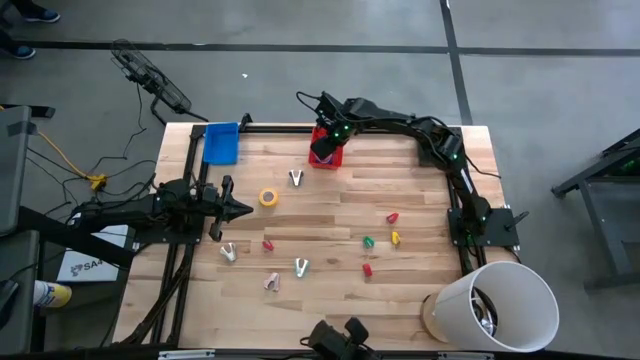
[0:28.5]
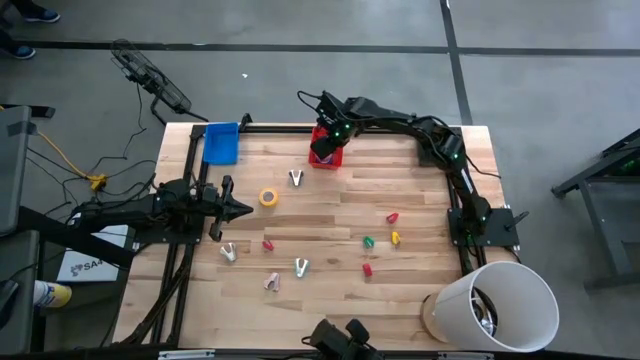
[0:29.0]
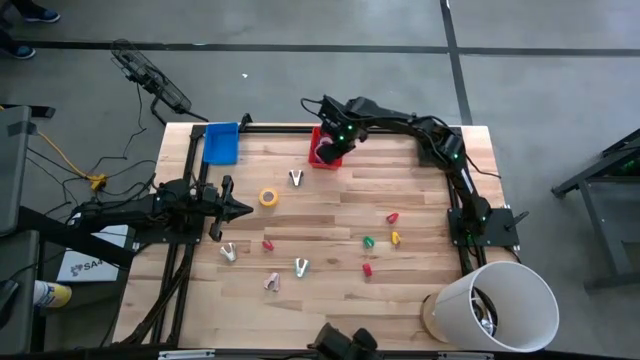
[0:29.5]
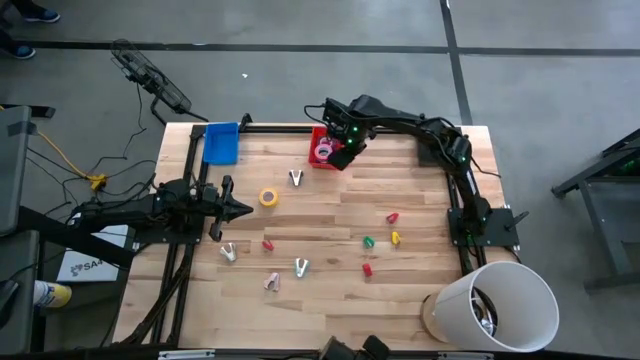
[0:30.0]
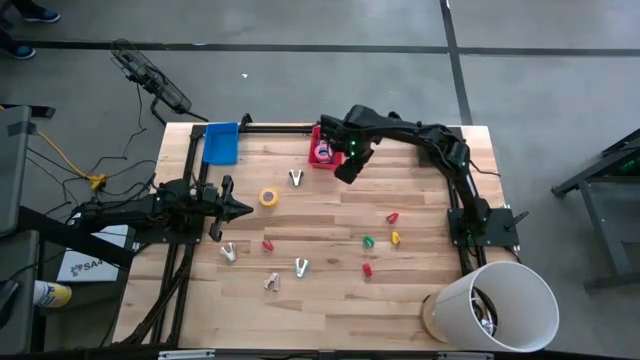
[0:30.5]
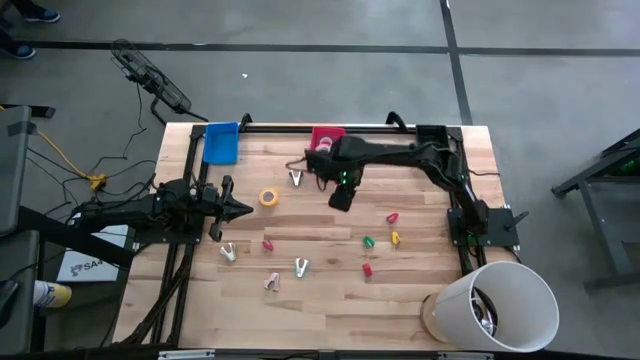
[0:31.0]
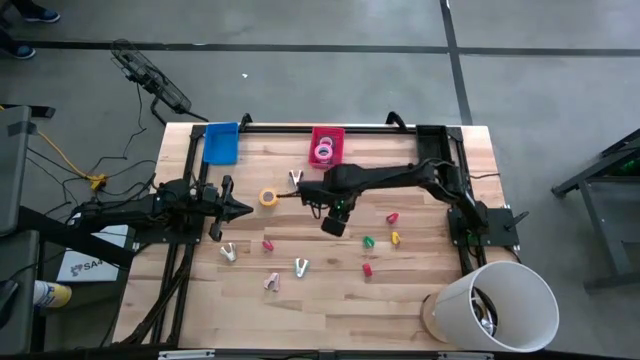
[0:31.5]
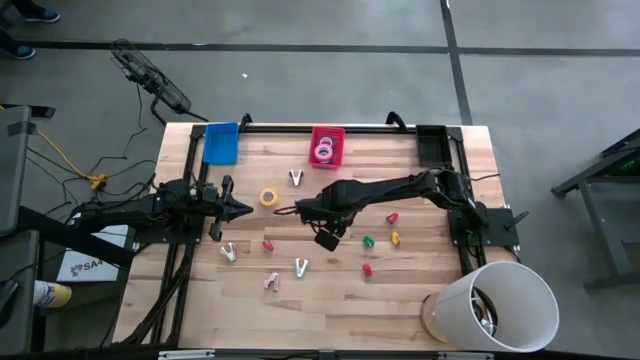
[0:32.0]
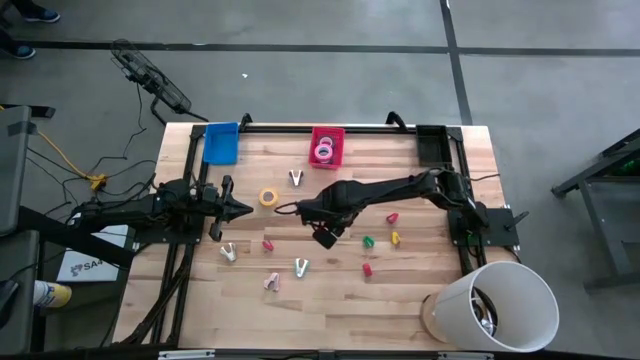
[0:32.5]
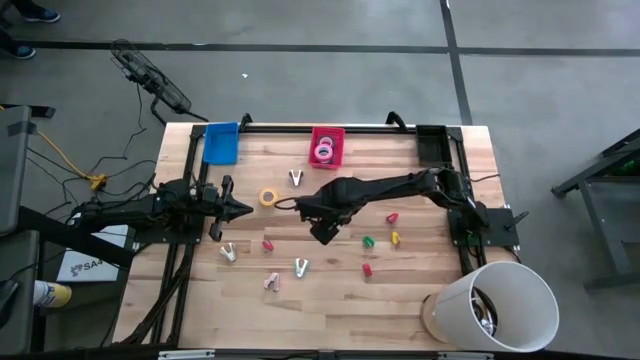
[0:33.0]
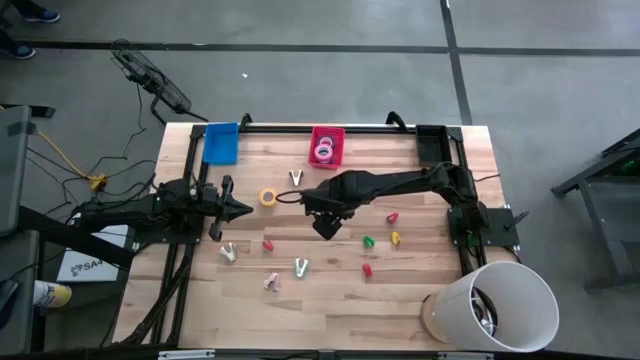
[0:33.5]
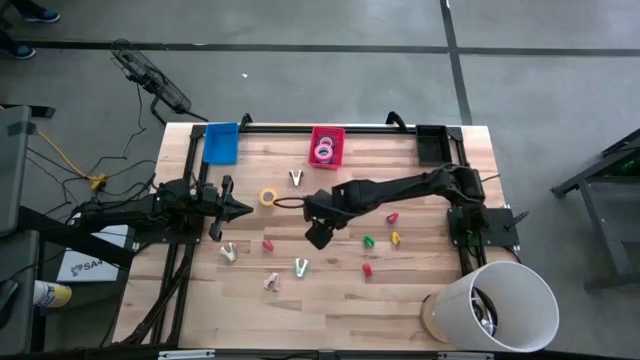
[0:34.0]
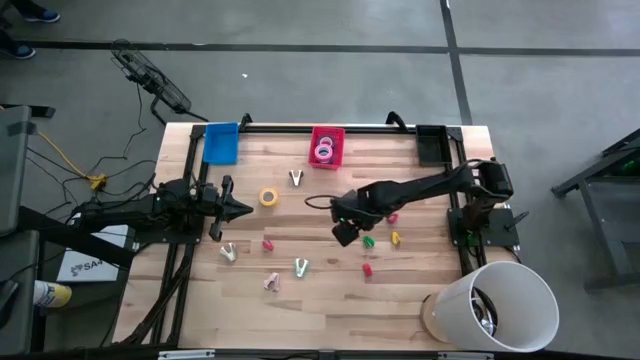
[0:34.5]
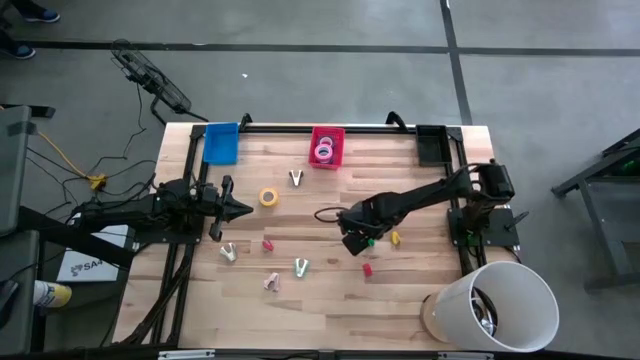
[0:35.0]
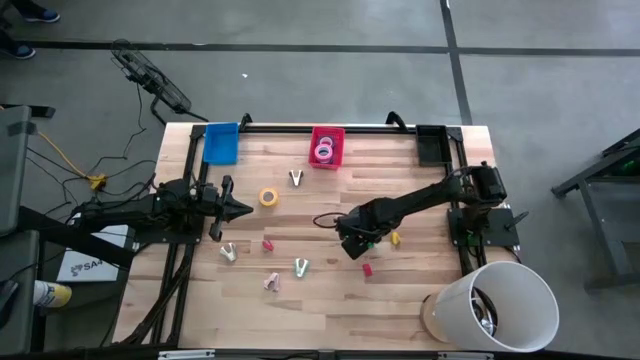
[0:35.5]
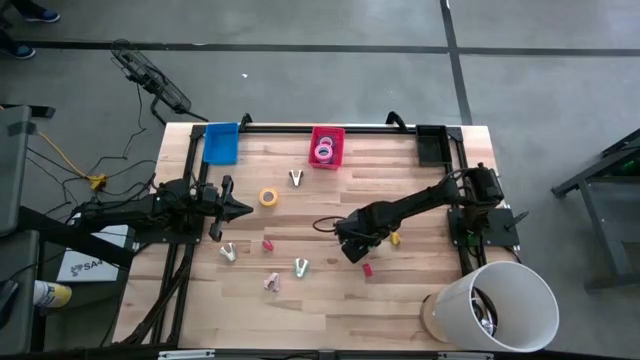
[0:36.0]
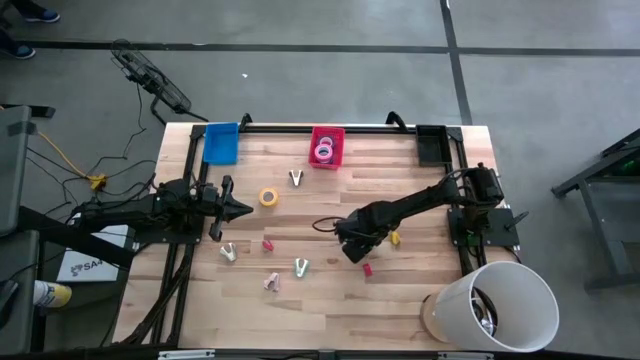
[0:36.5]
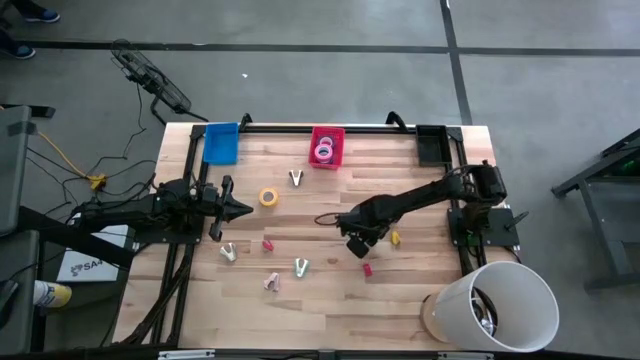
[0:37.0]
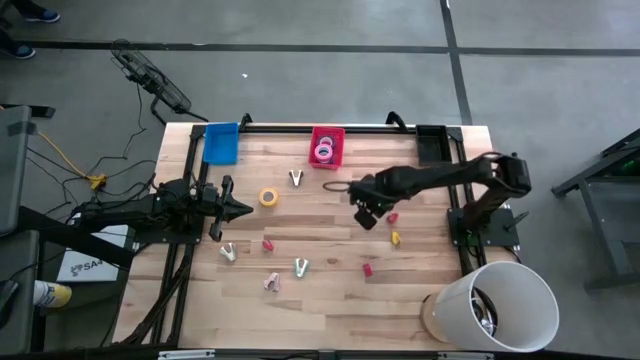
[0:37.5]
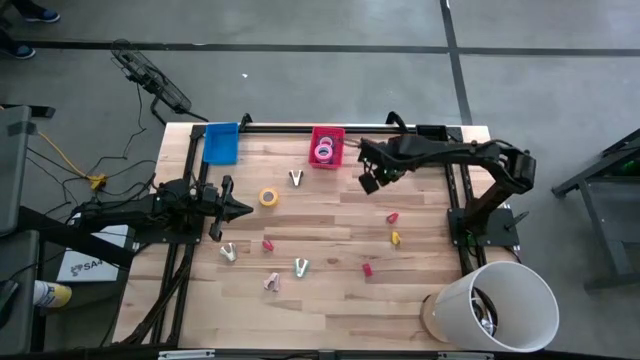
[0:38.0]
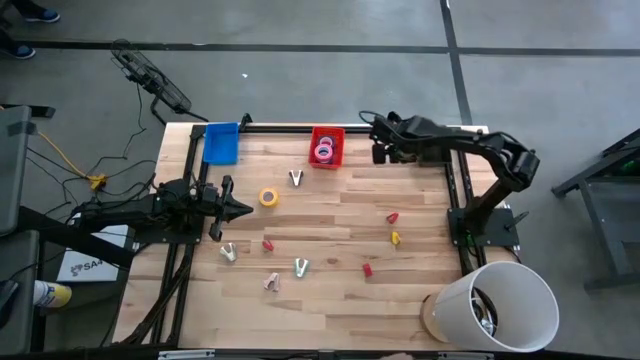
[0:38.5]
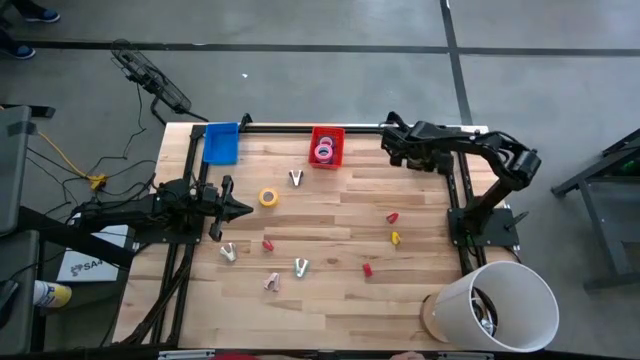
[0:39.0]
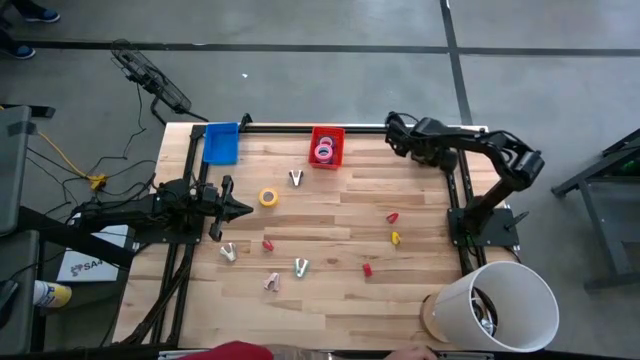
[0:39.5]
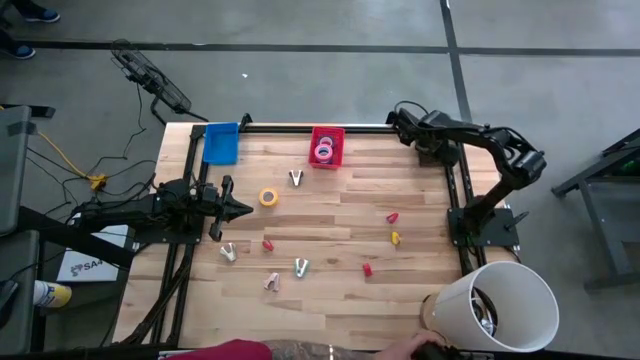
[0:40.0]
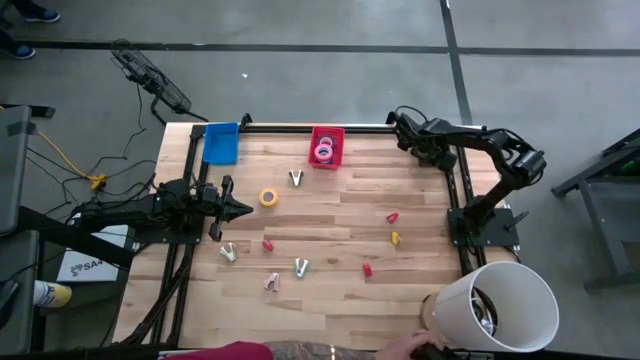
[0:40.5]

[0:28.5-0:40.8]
Task: Pick and place Stapler, Stapler remover, tape
Put the green stapler into the black bin

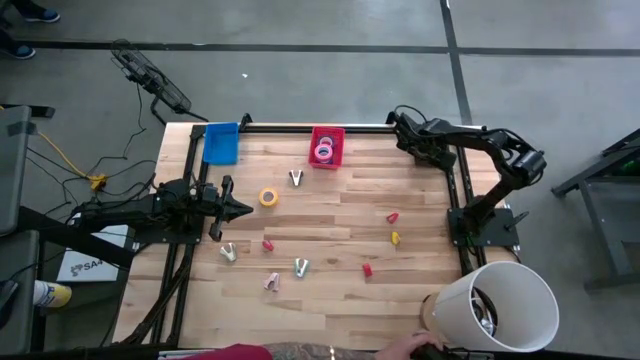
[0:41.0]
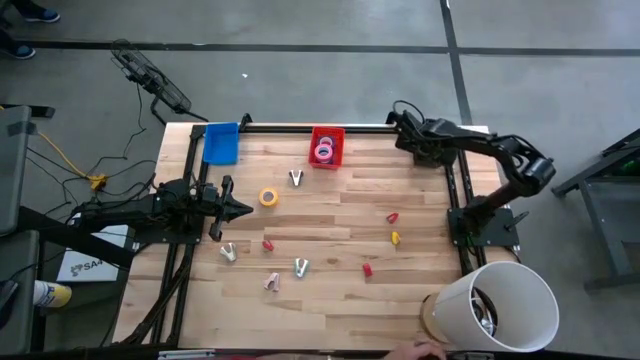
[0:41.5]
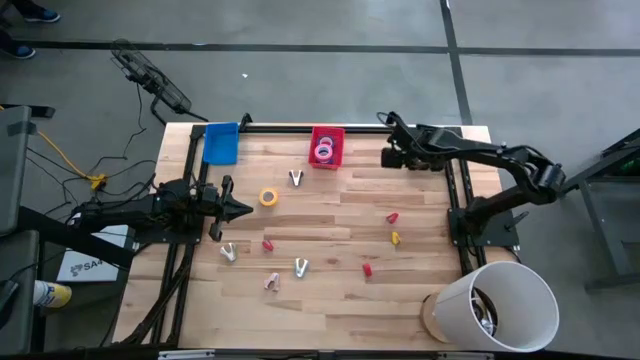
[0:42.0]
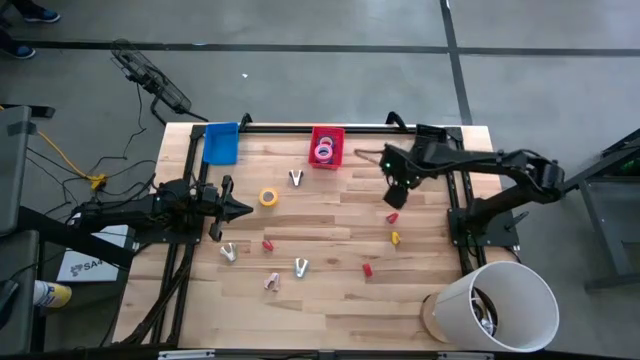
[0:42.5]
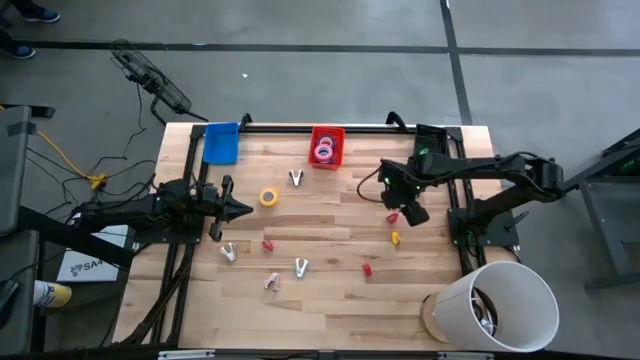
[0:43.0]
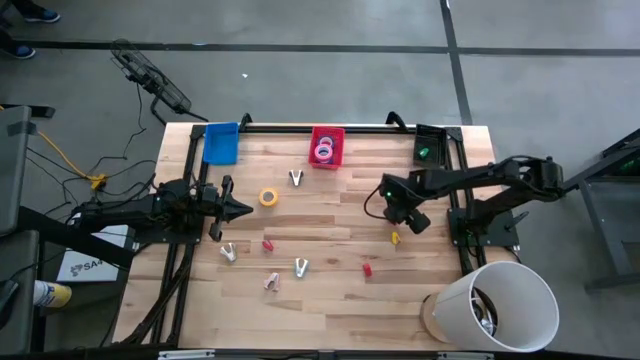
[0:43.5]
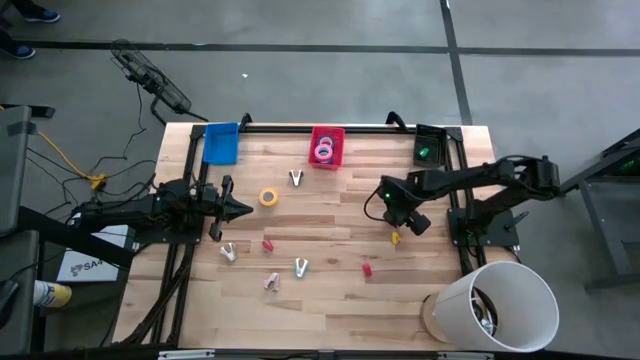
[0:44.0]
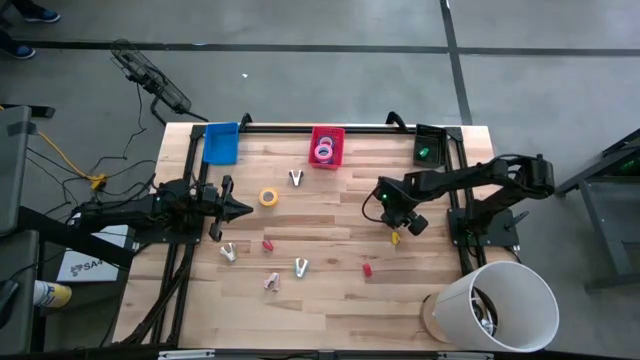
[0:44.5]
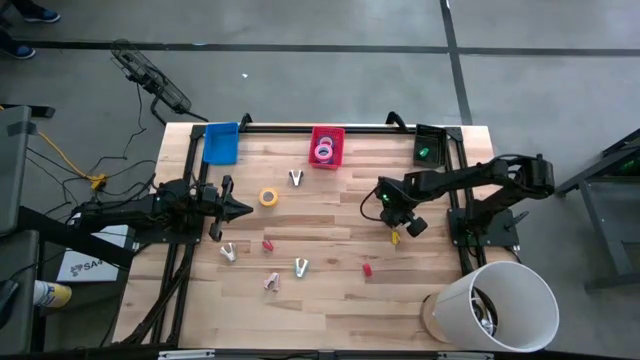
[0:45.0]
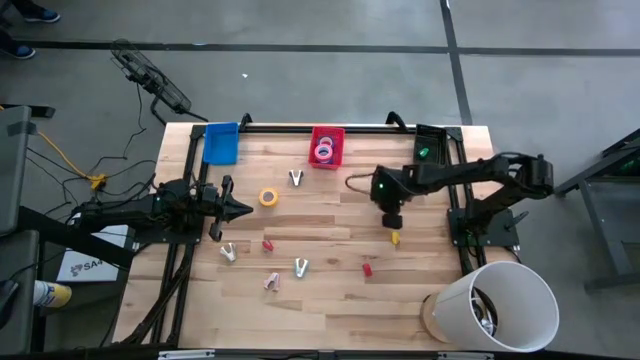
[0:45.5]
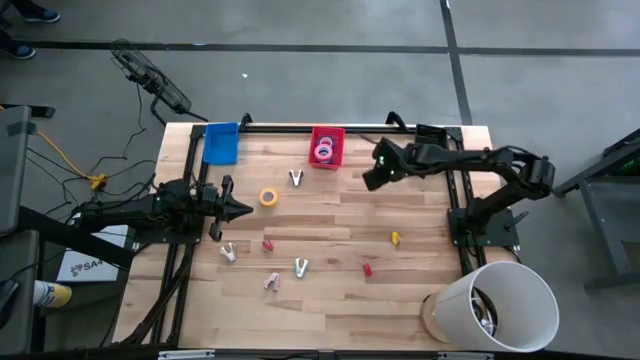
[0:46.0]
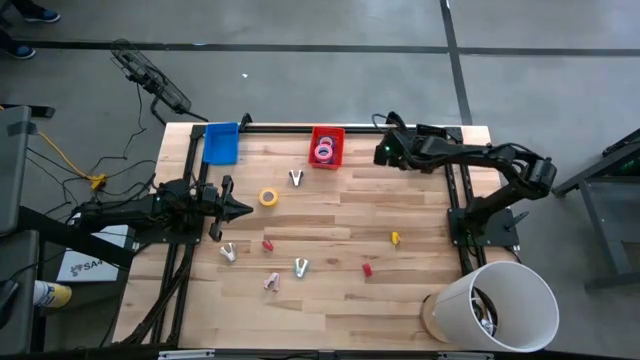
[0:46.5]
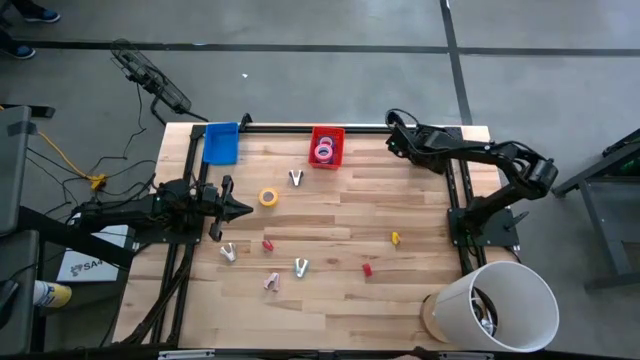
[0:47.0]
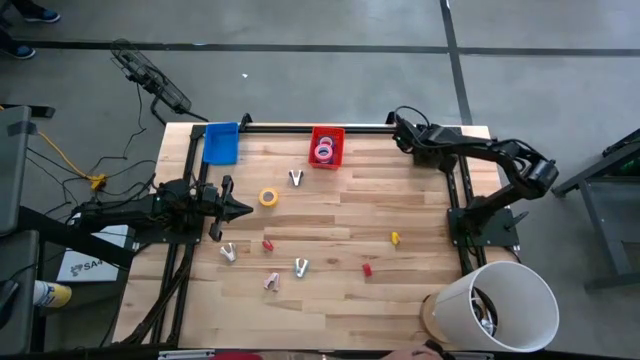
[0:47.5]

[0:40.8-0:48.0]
Put the top red stapler into the black bin

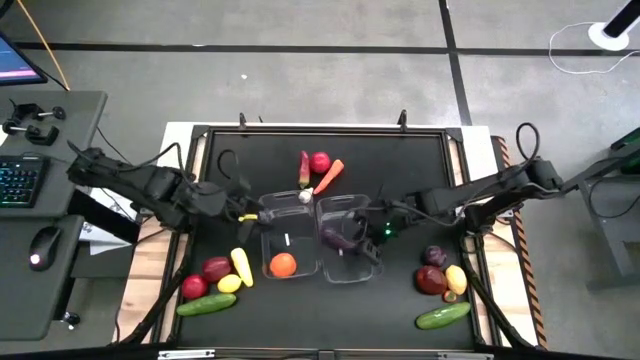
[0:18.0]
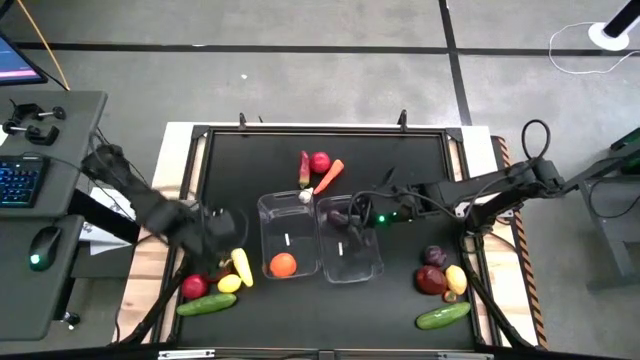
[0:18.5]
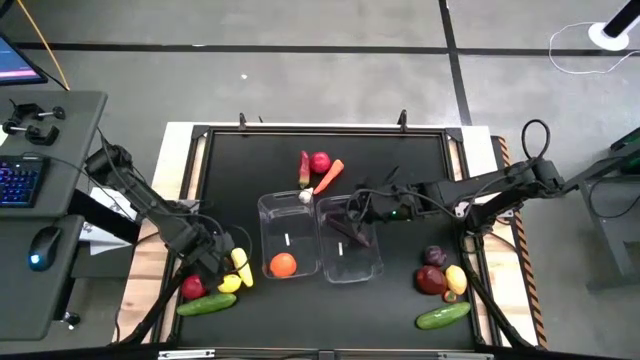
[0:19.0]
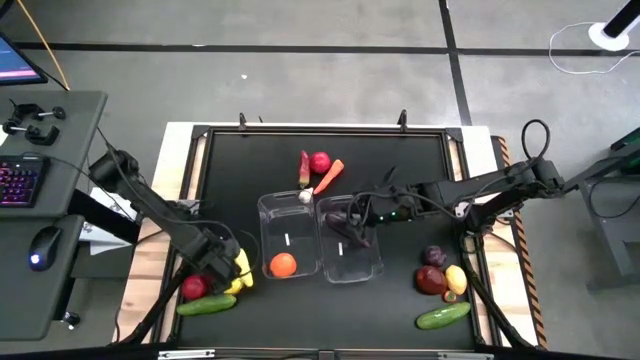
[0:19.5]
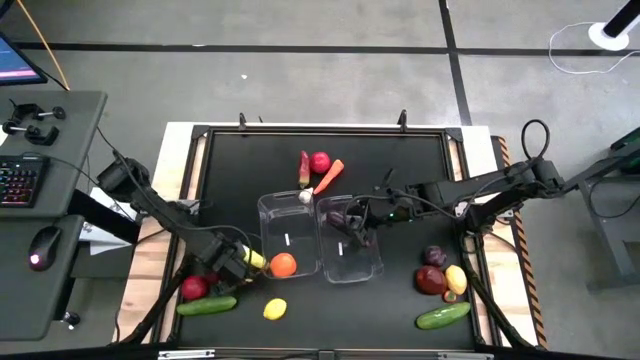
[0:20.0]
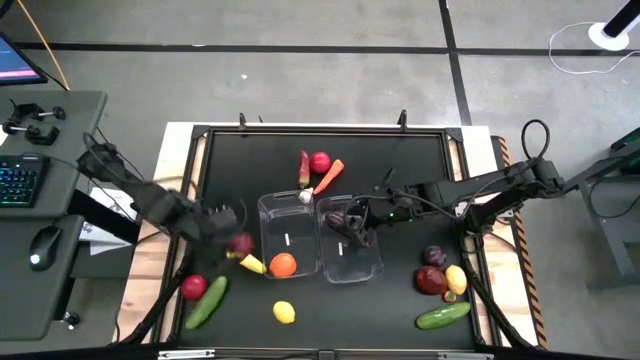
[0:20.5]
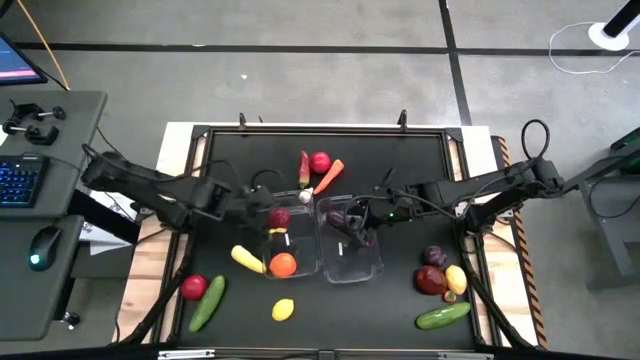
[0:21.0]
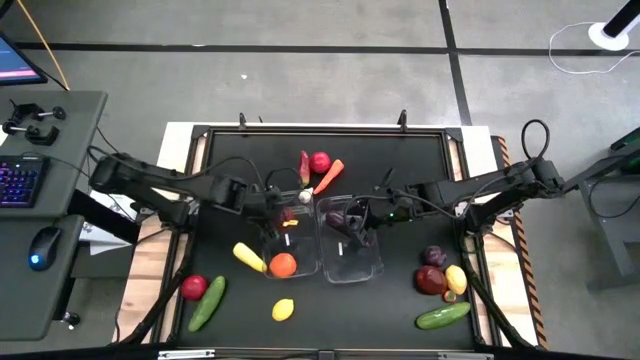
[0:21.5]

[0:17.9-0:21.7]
Task: Sort produce into baskets
Put the left apple into the left transparent bin
